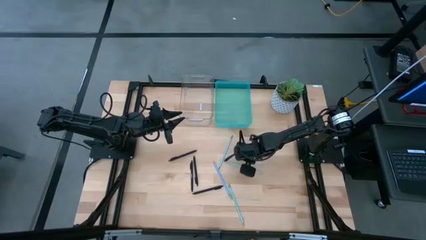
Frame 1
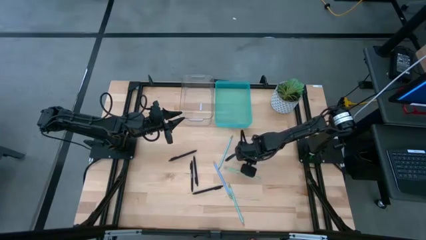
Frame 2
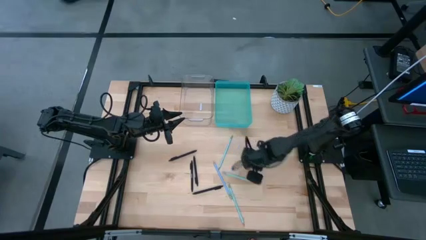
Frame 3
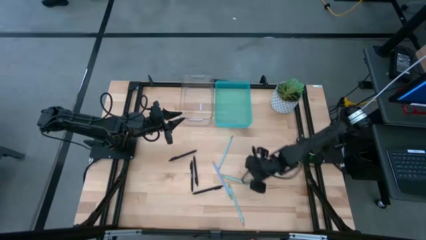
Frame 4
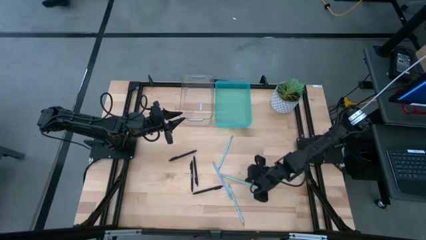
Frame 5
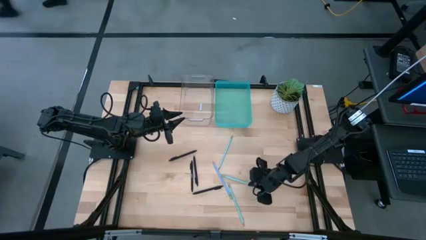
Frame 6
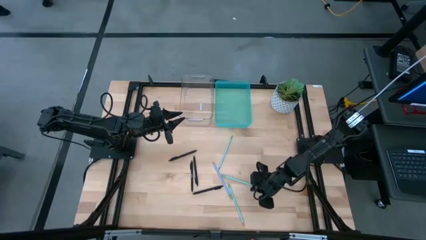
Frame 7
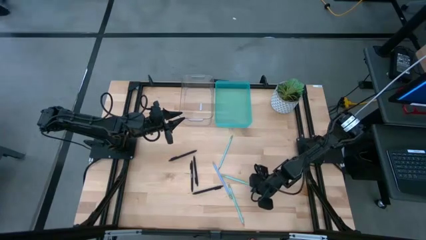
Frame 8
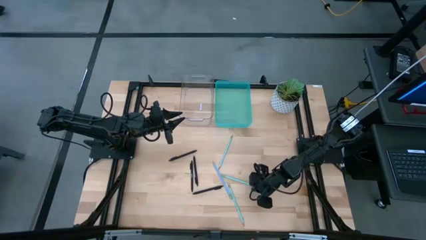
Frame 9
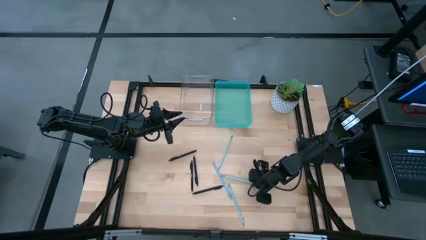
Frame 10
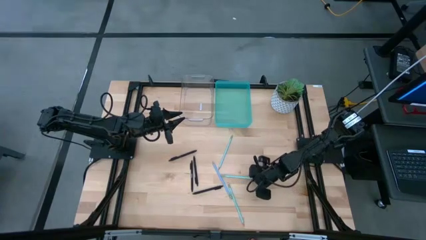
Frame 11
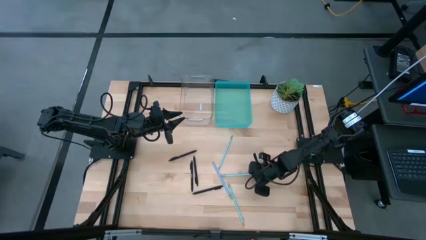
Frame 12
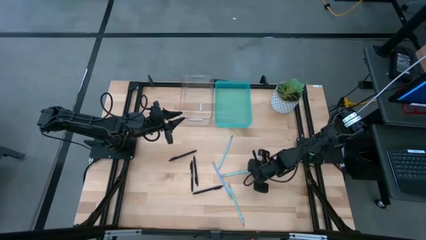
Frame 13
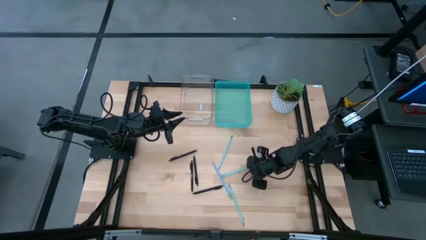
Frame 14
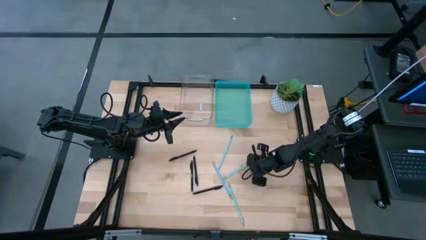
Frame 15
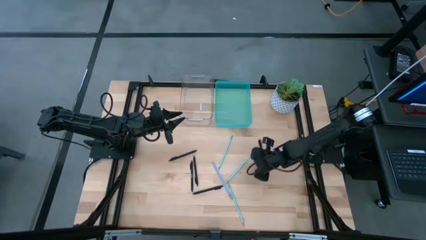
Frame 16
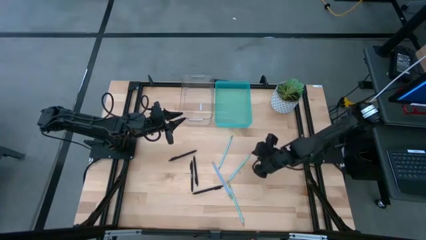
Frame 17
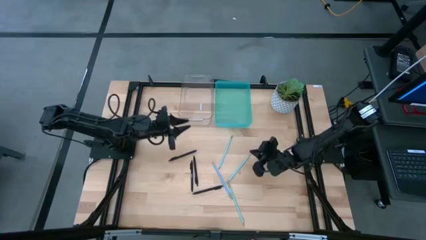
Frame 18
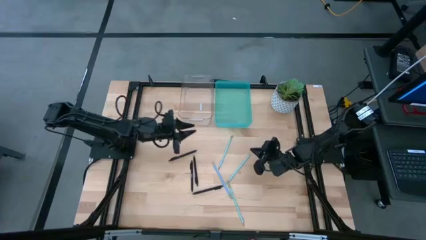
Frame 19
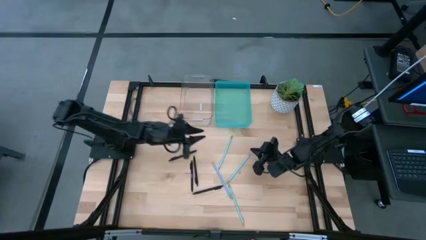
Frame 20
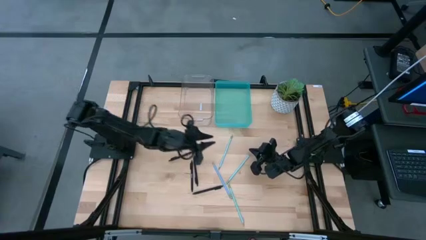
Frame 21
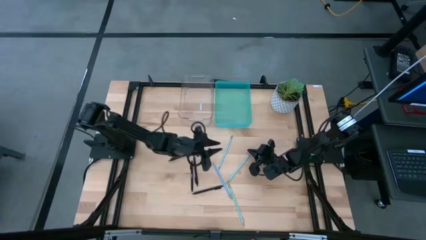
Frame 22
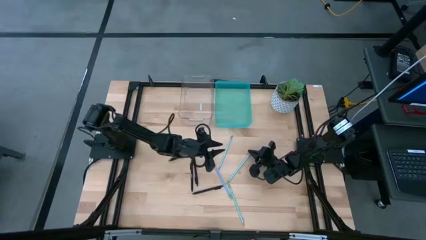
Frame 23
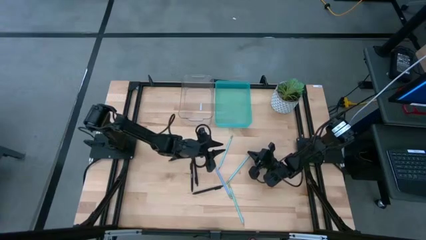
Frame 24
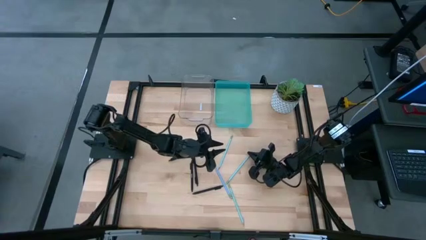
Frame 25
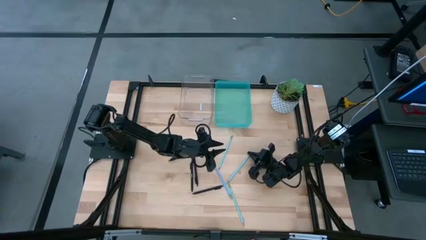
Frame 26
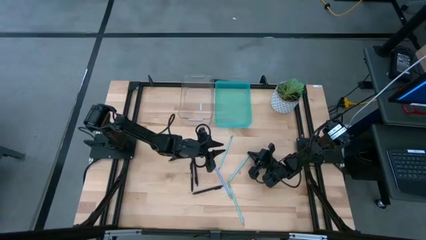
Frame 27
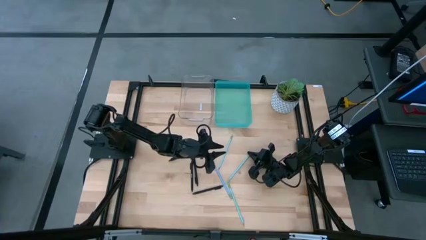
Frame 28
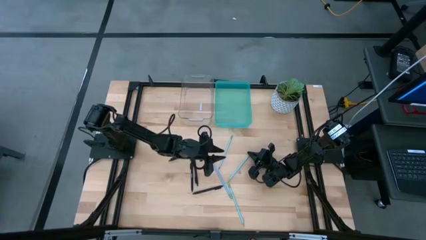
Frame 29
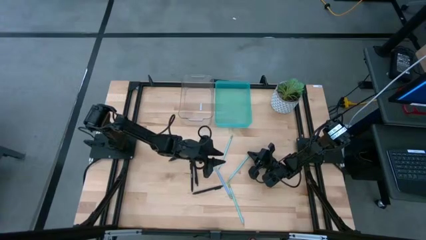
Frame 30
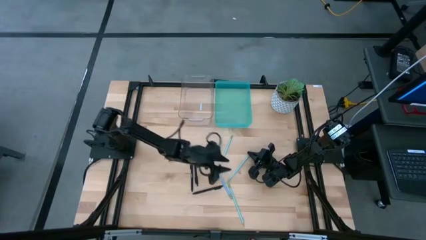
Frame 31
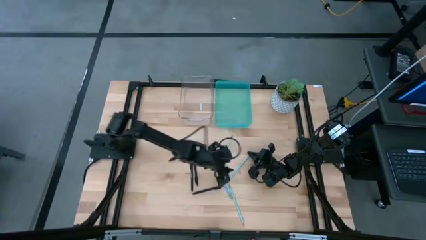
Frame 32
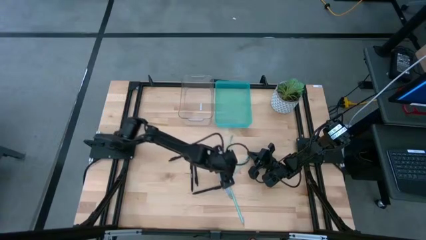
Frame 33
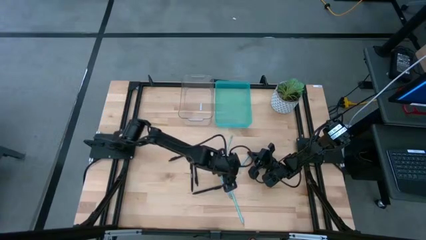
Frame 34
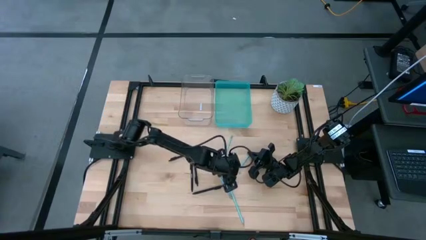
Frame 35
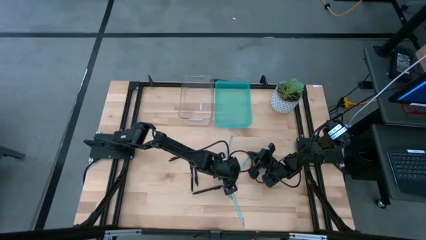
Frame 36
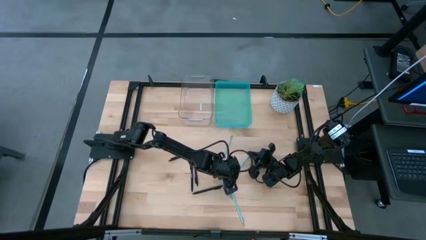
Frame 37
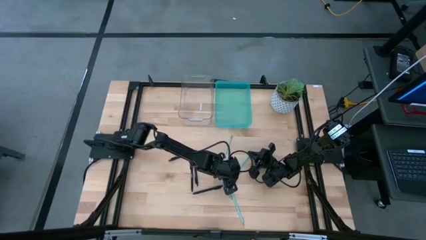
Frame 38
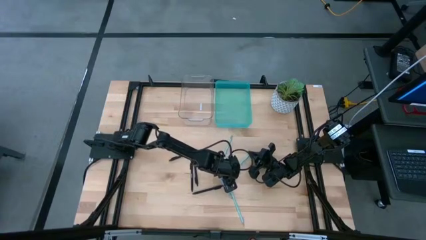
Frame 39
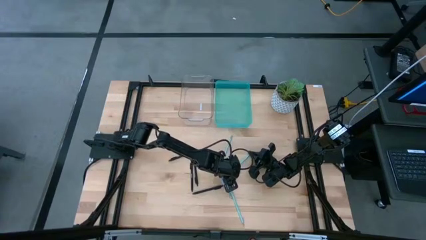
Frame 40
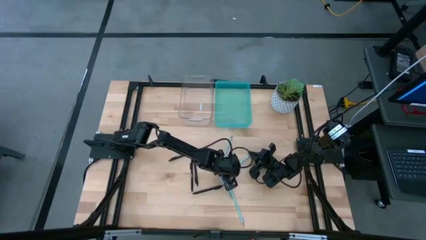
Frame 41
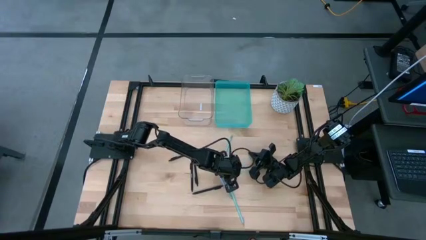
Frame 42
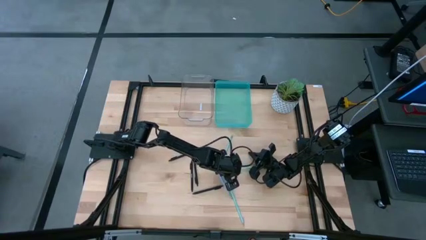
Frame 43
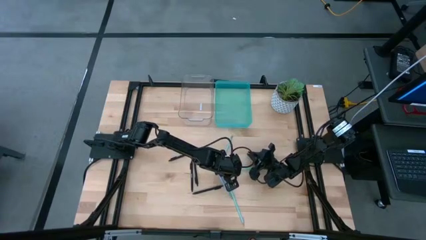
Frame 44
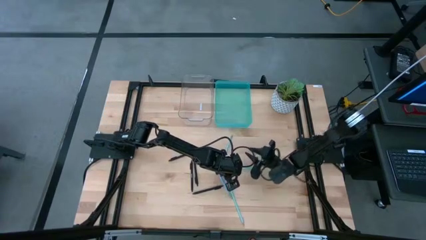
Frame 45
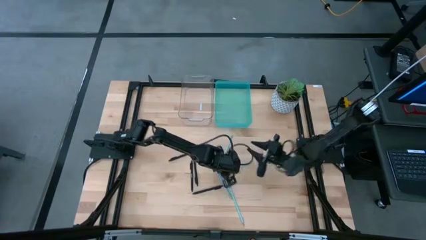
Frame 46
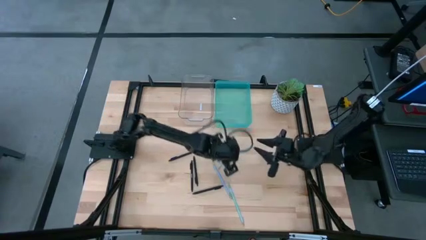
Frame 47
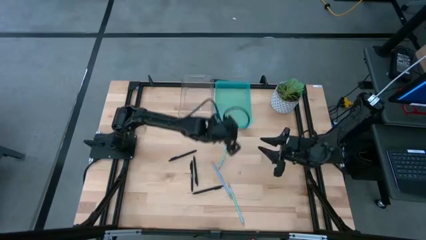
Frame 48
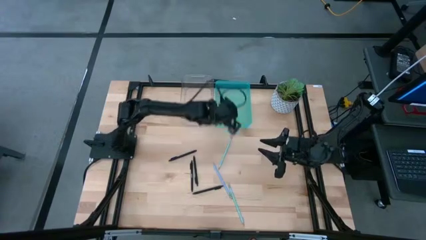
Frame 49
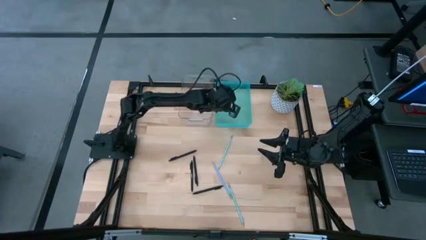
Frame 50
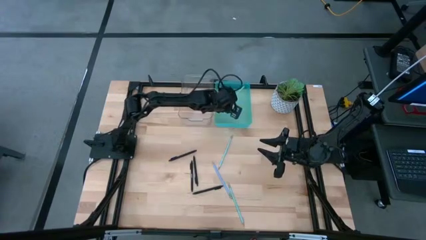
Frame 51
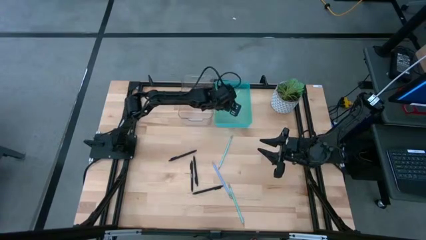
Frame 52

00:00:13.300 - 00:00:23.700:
Task: Sort pens & pencils
Put the light blue pencil into the light blue bin

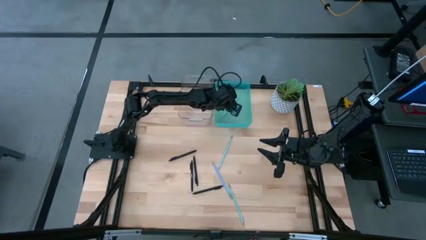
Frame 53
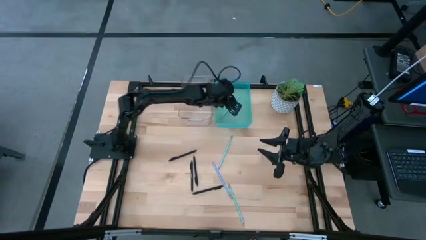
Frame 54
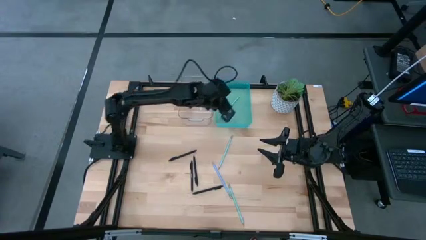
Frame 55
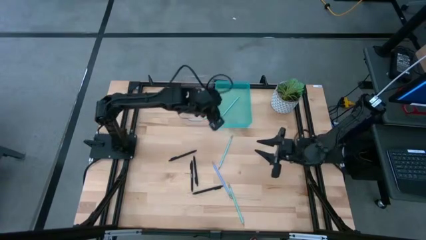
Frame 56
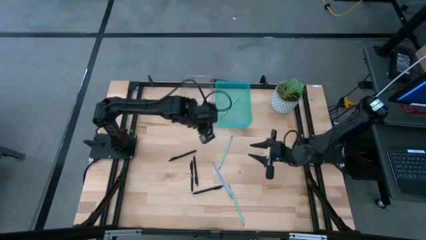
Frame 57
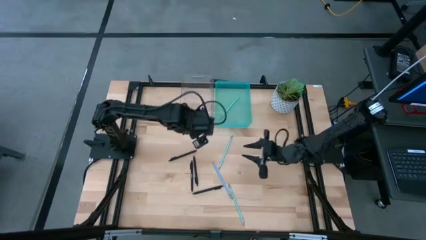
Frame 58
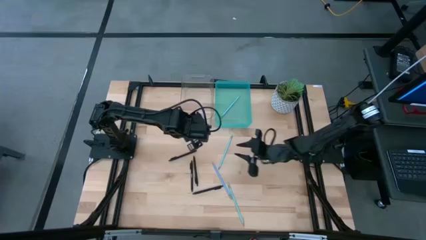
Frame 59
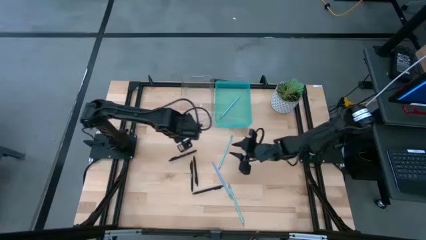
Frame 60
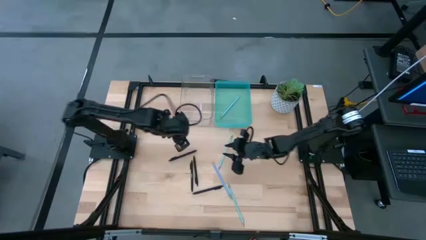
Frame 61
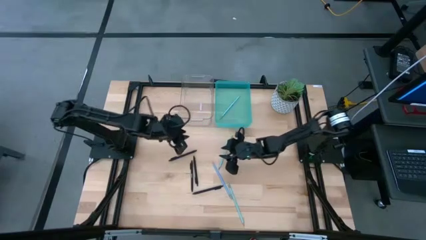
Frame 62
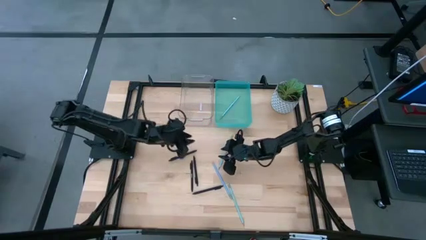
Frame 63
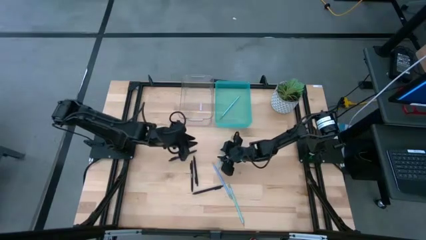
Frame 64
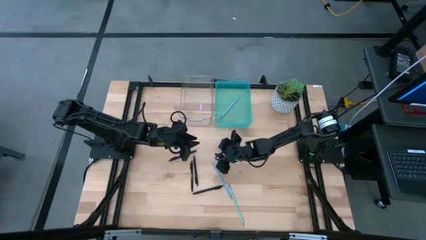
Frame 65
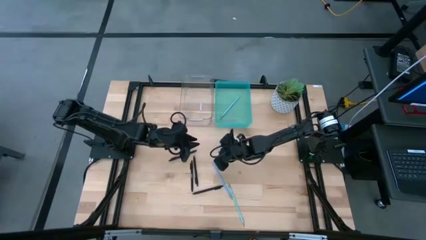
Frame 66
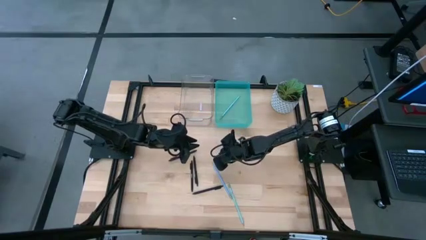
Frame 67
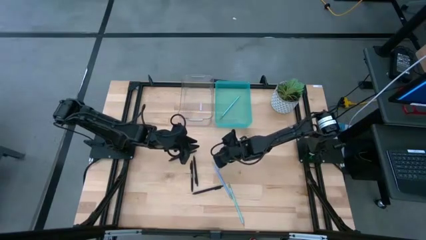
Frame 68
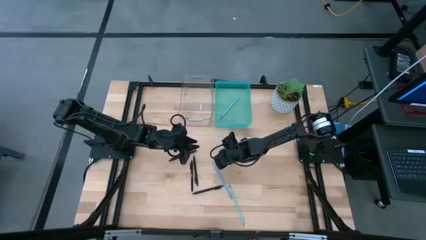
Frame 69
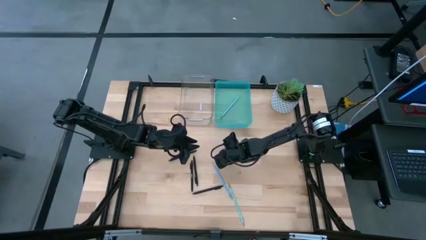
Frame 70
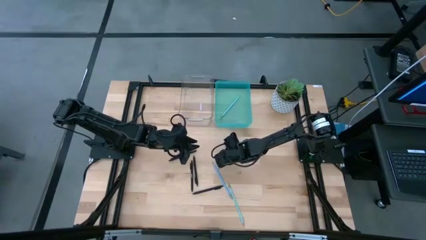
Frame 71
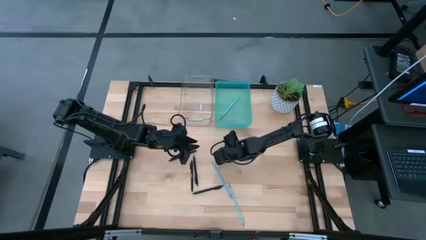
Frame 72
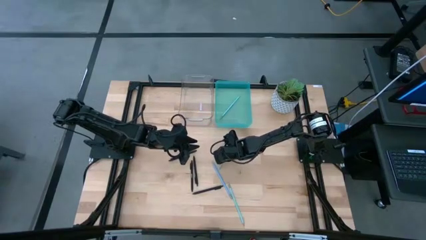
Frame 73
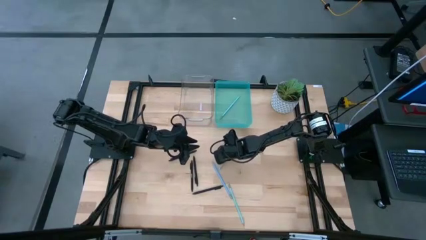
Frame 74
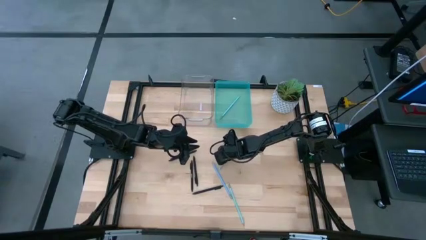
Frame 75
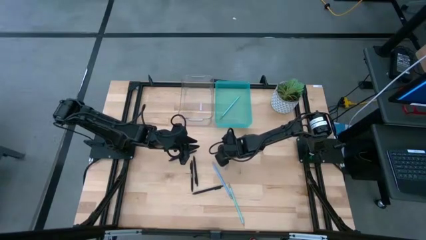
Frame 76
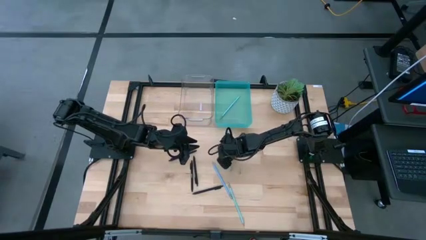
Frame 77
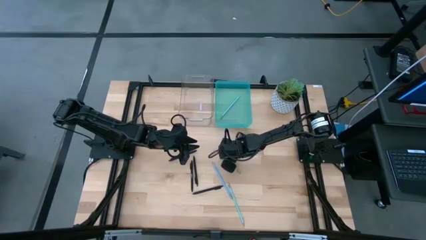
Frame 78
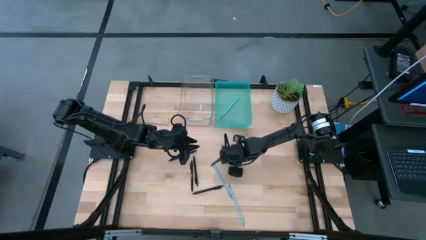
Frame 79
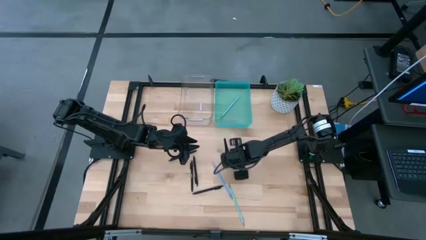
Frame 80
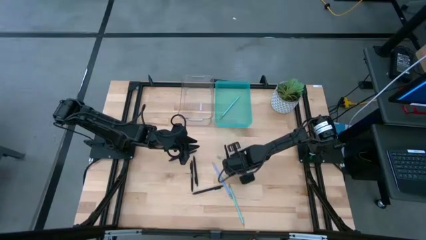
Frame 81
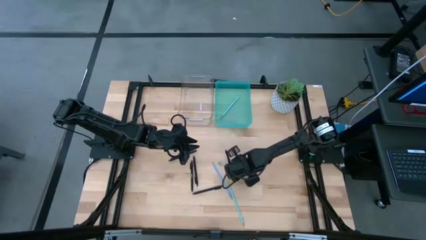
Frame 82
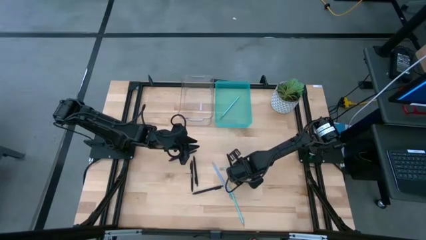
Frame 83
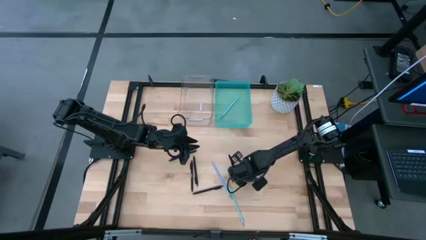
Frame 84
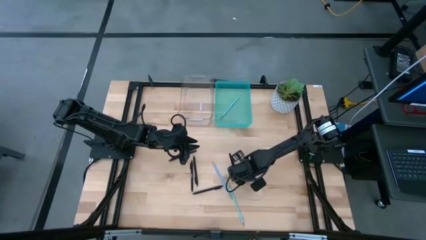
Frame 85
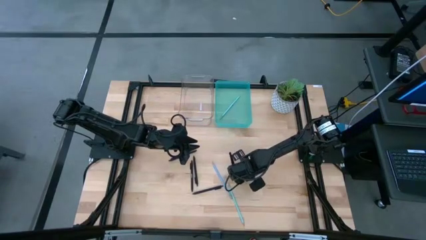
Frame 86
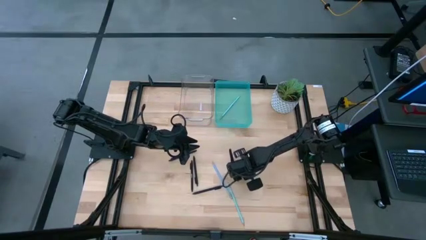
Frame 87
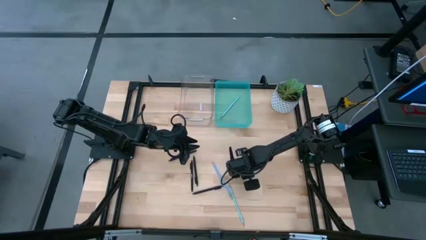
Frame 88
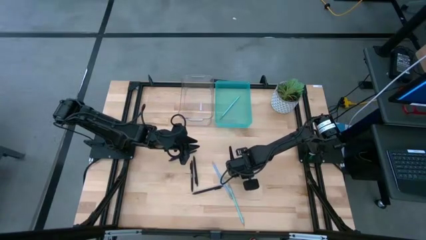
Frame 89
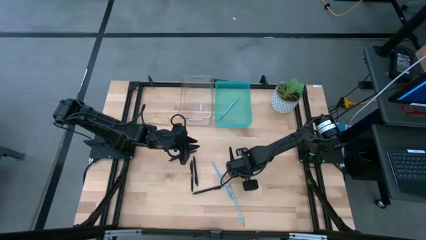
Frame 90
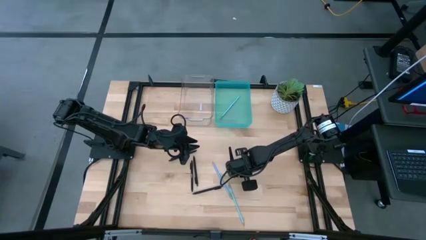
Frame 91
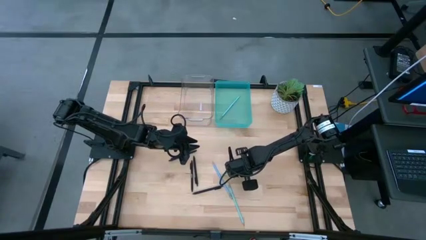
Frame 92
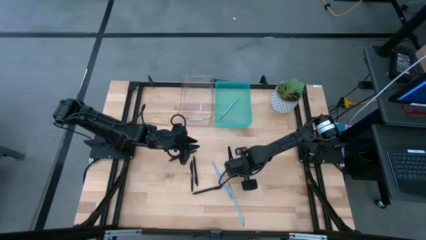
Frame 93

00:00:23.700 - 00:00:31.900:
Put the light blue pencil into the light blue bin
